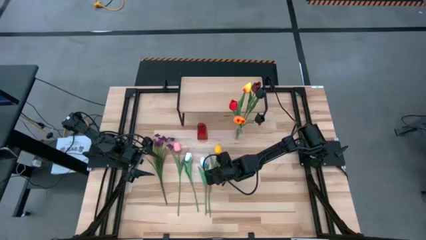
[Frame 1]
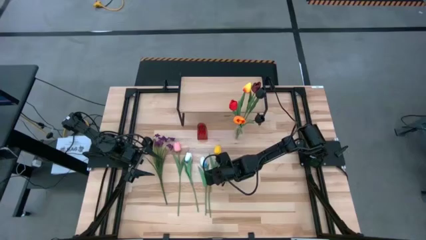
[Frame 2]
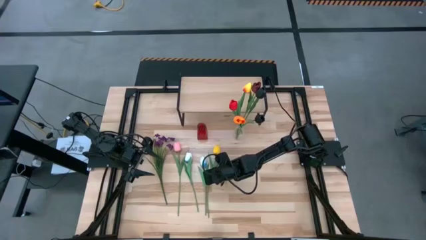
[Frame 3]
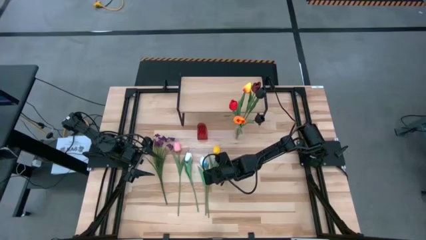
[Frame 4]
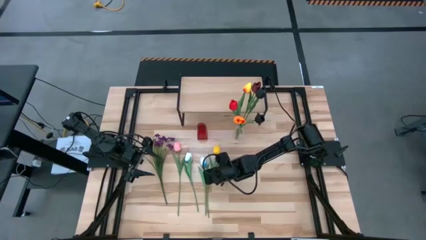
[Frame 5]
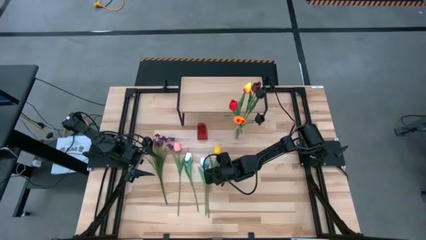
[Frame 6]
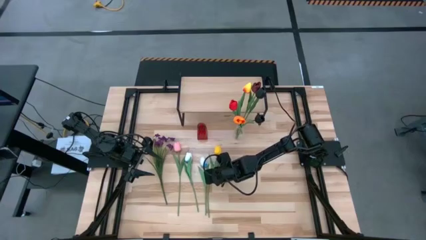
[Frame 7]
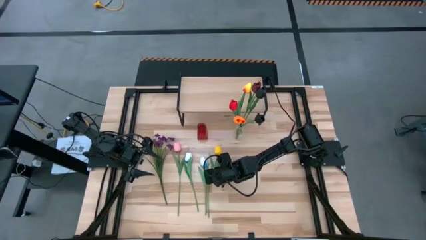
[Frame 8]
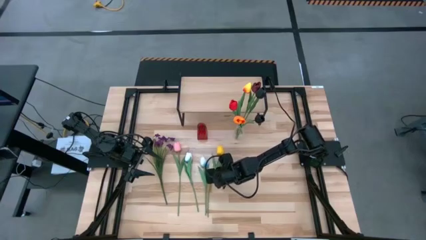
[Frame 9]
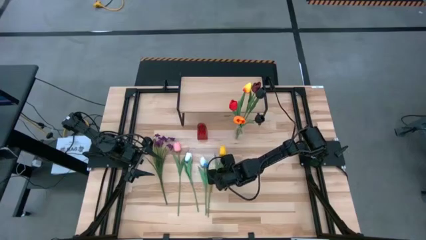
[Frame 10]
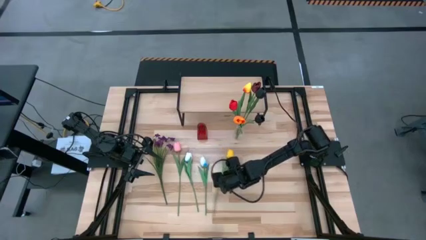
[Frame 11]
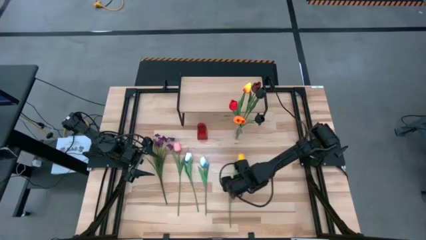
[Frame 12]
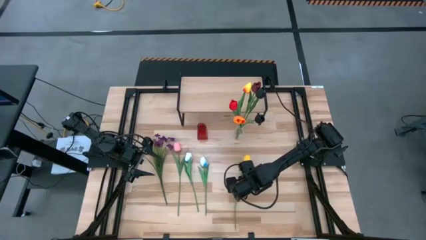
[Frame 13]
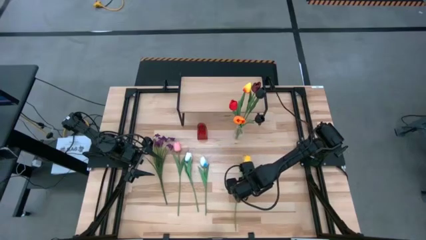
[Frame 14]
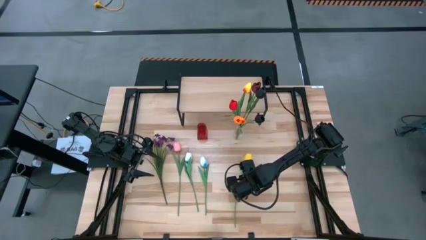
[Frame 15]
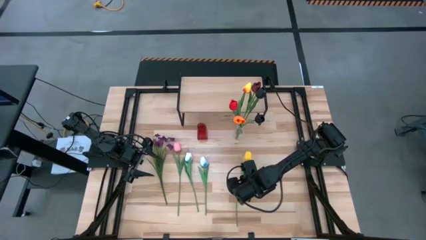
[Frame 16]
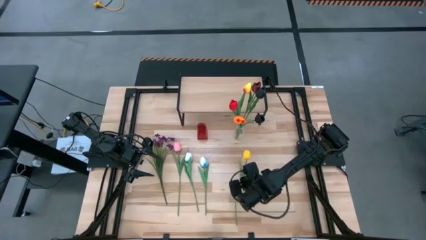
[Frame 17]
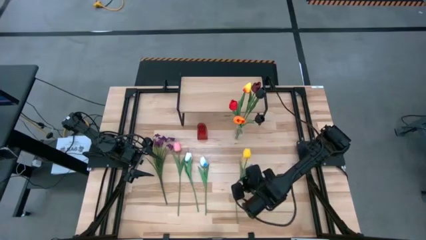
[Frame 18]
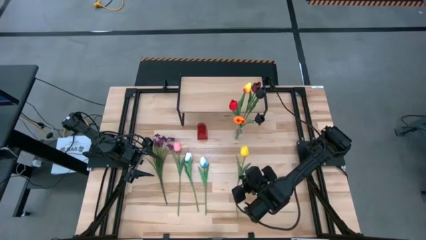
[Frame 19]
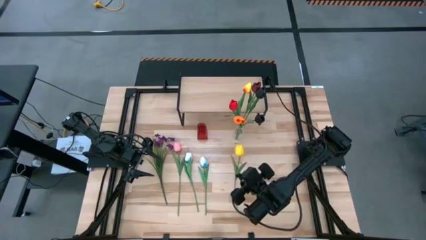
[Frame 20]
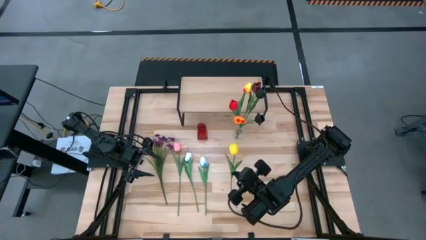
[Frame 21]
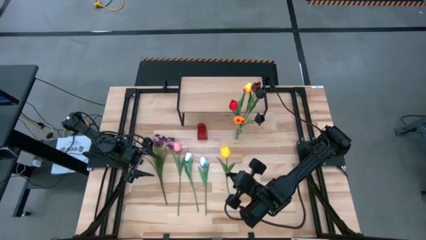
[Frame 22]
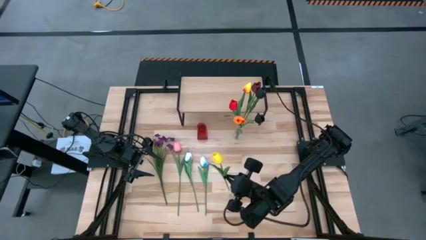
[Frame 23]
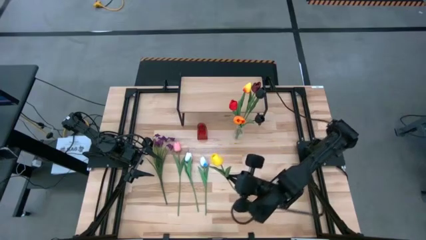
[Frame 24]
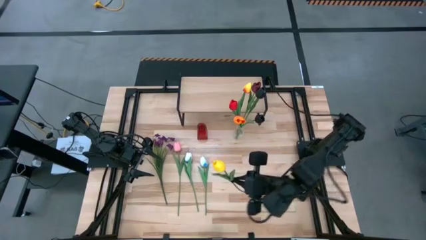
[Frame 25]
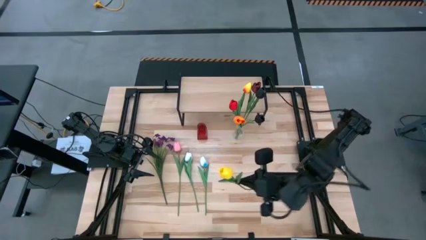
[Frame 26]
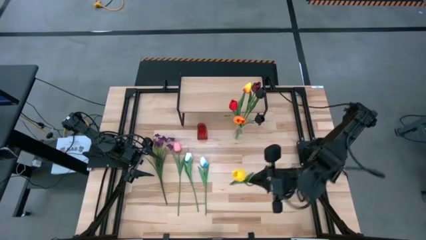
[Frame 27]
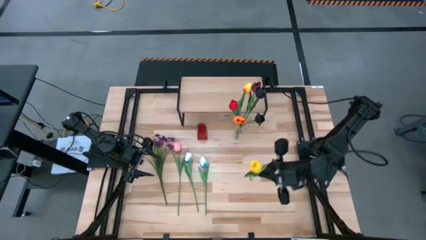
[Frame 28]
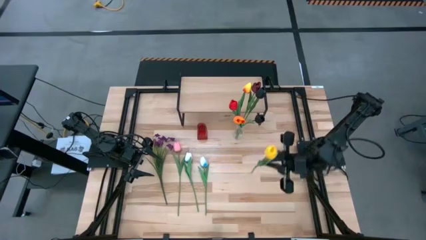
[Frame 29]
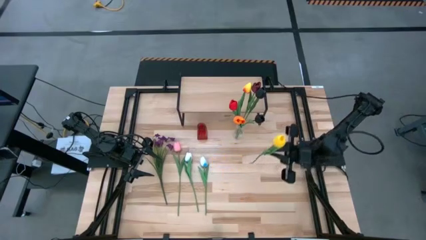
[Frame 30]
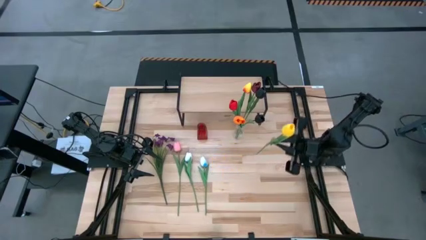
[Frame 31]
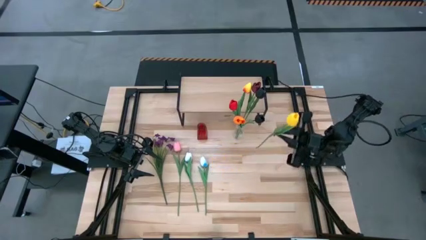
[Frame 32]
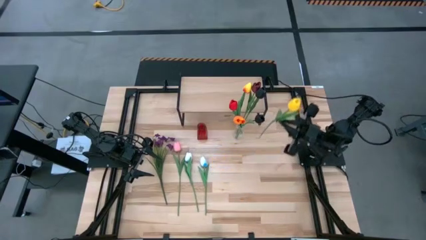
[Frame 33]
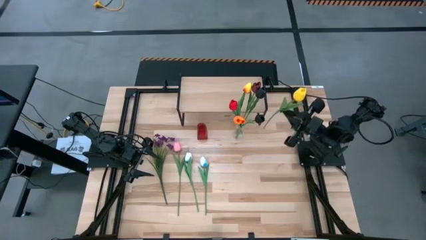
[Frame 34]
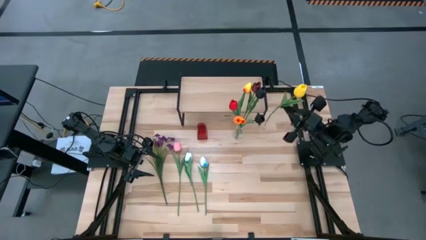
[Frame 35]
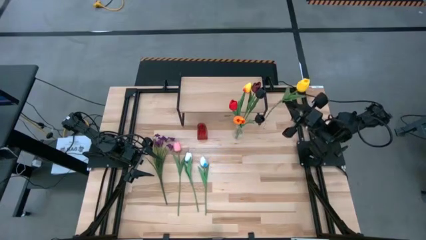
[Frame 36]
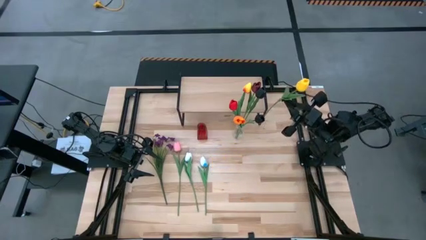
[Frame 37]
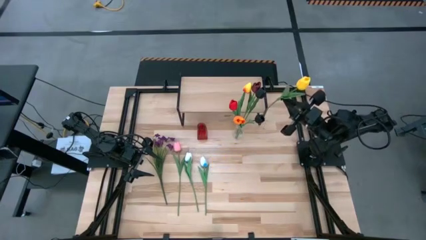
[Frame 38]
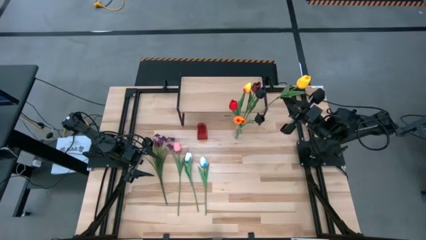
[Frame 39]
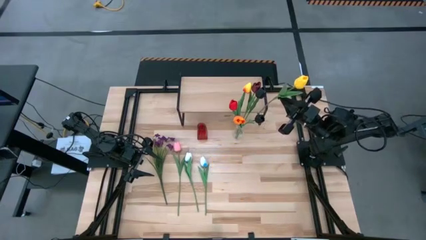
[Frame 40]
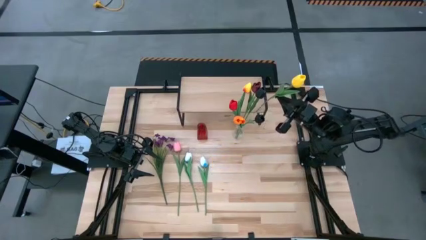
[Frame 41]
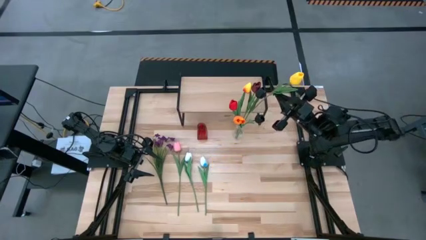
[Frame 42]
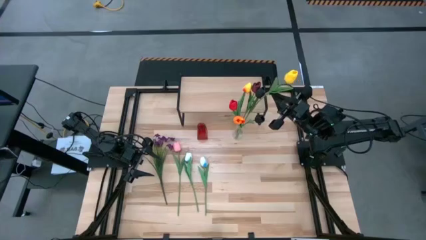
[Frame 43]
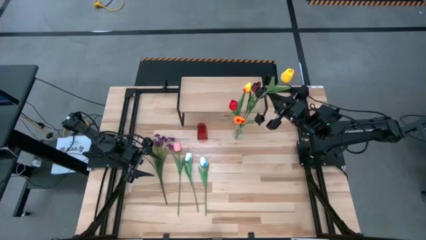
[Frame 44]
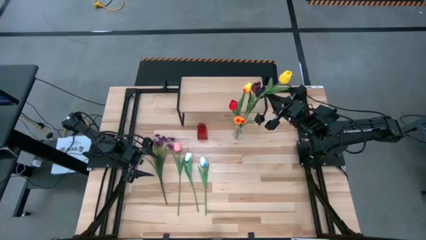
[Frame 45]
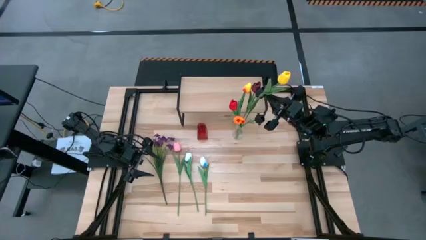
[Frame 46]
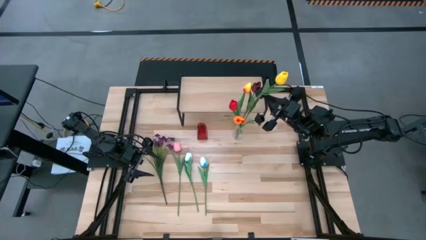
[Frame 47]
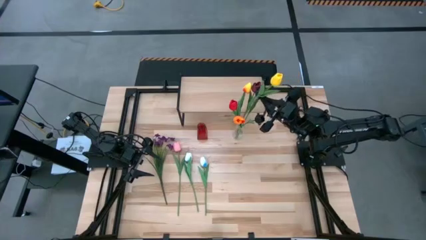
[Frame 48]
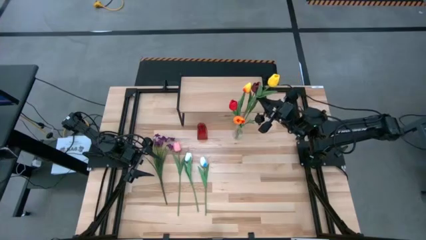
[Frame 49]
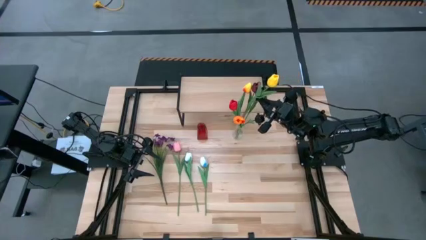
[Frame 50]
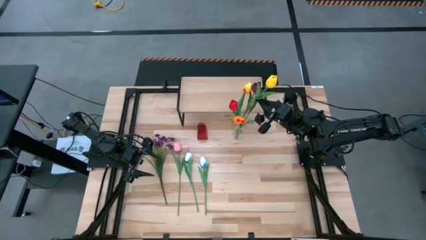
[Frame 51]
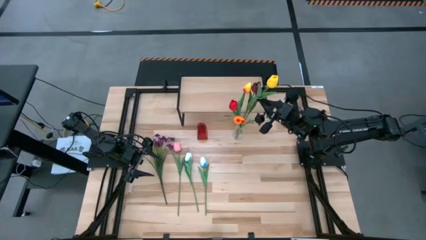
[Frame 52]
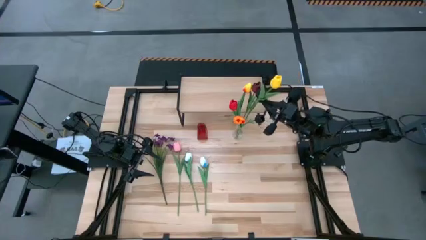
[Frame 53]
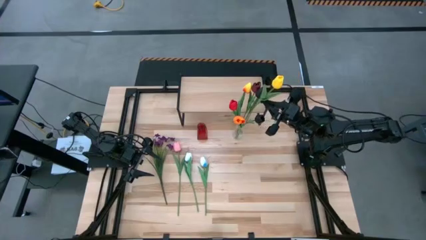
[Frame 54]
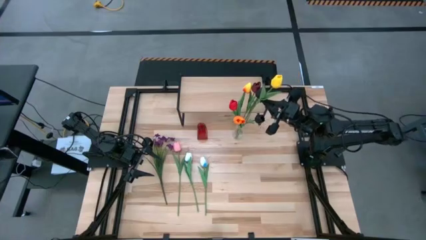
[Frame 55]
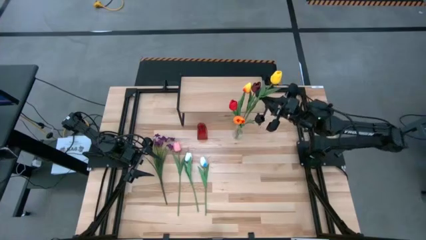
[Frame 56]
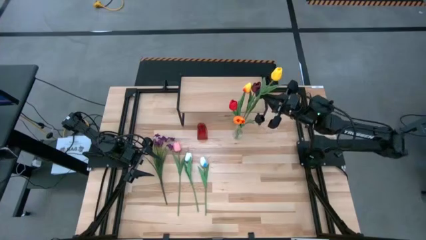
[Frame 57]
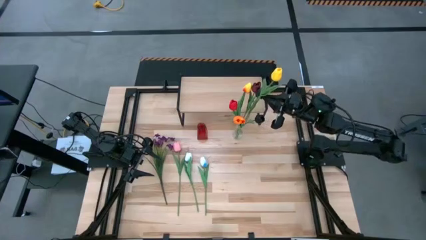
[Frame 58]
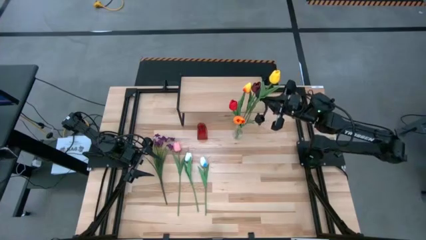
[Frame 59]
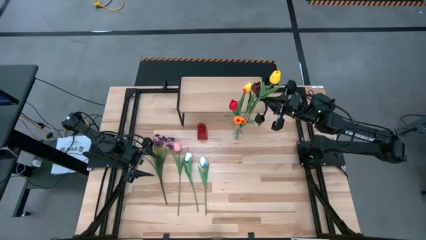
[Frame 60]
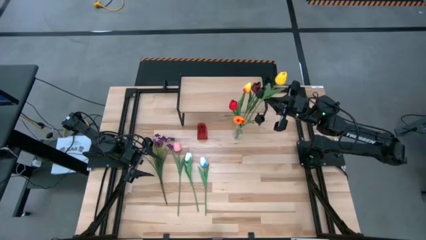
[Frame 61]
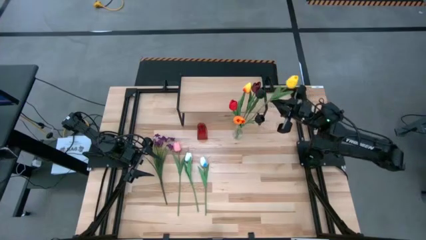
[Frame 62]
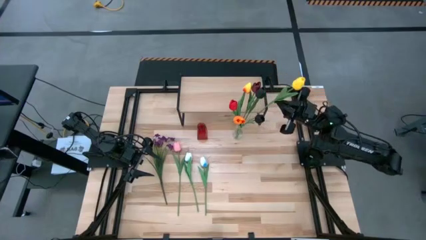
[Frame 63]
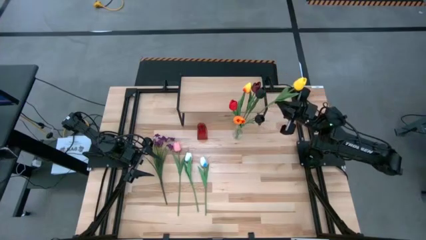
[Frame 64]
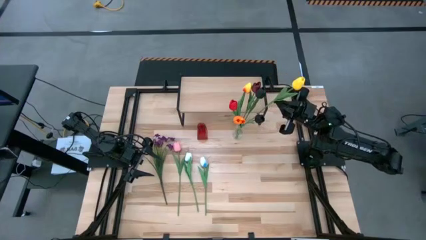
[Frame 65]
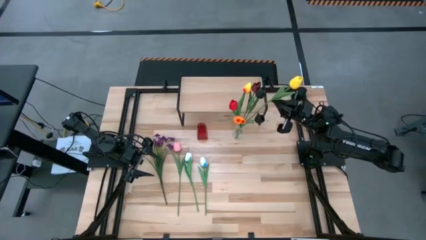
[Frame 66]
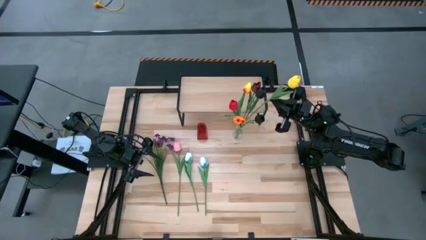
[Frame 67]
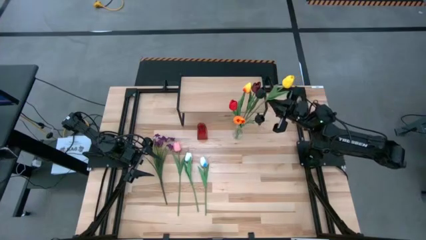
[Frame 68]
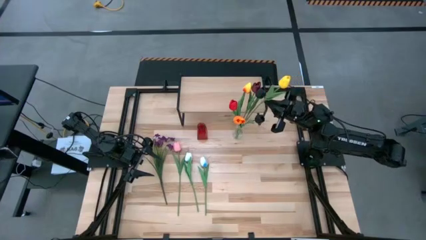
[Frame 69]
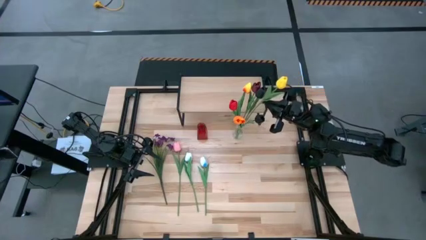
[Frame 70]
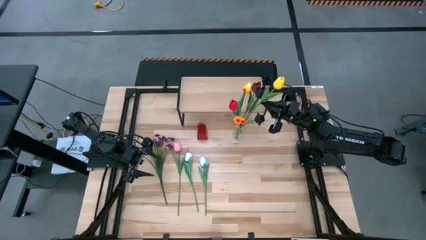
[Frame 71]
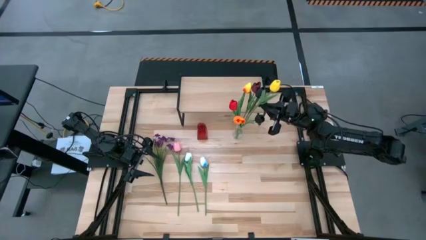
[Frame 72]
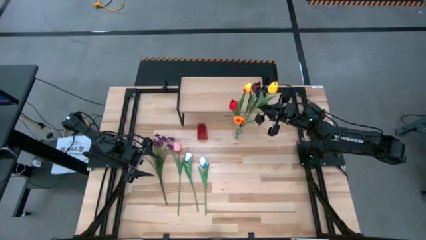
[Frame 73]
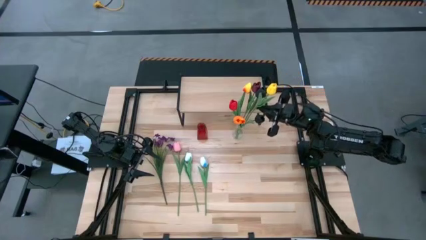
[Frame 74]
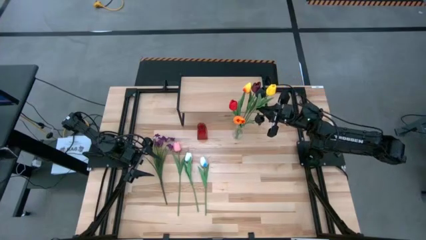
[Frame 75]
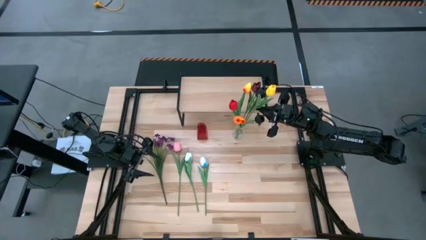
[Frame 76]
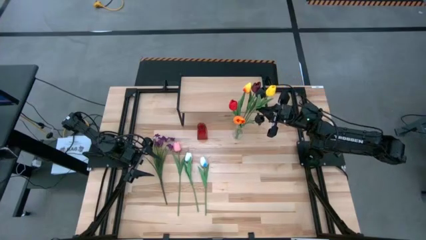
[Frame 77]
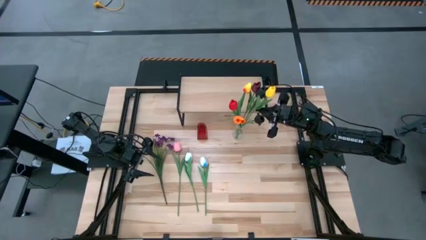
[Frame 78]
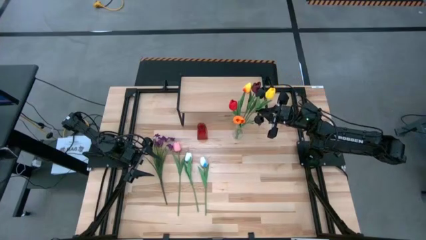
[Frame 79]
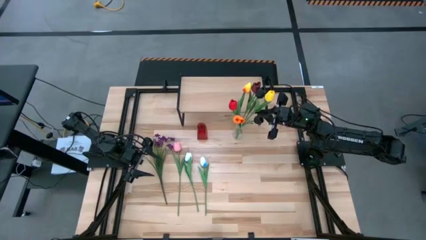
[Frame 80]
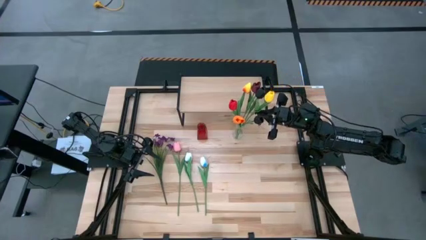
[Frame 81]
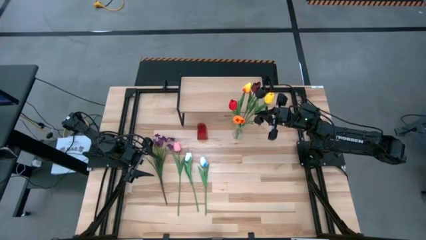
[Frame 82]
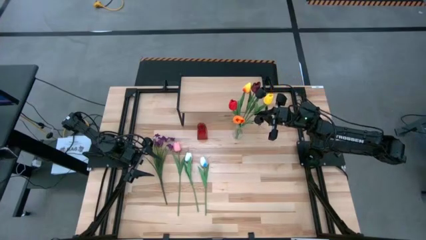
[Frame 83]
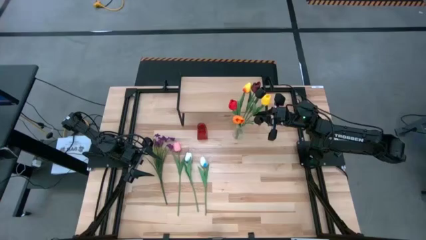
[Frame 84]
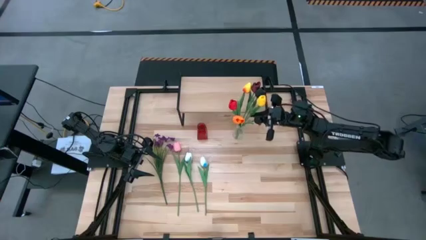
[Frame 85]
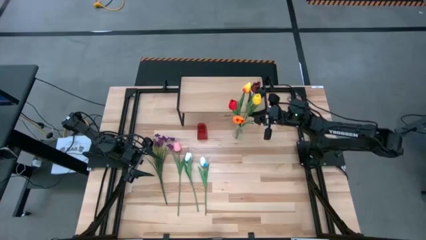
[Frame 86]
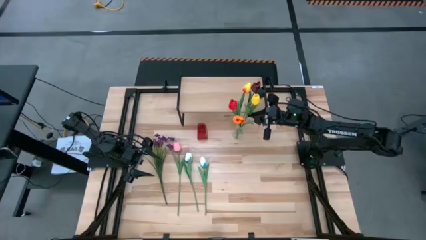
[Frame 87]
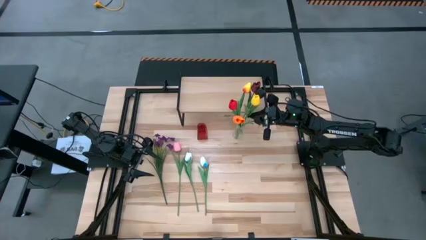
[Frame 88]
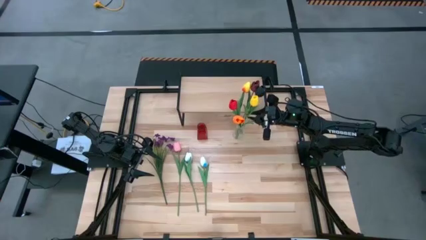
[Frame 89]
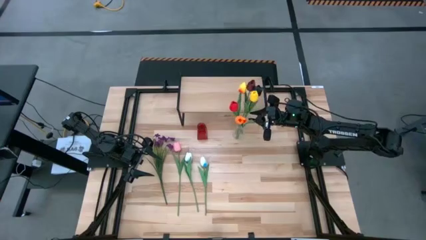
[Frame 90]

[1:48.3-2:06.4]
Task: Pick and place flowers into a vace then onto a shelf
Put the yellow flower into the transparent vase
